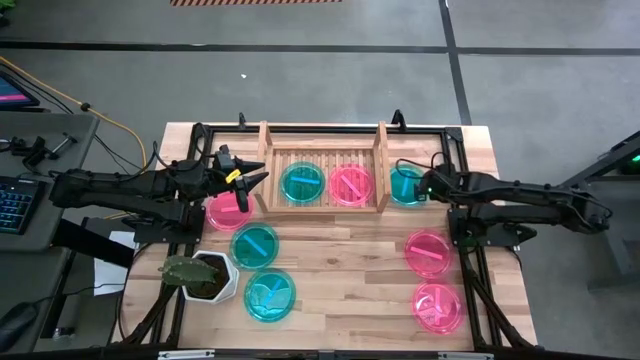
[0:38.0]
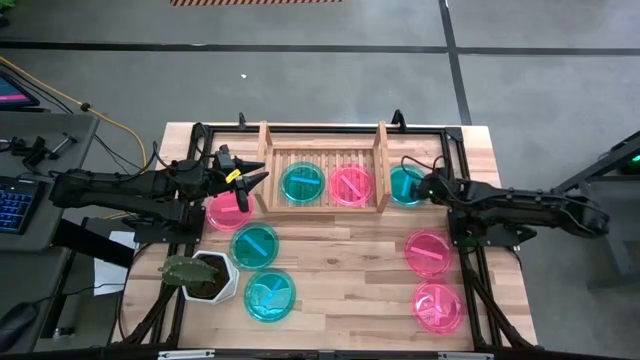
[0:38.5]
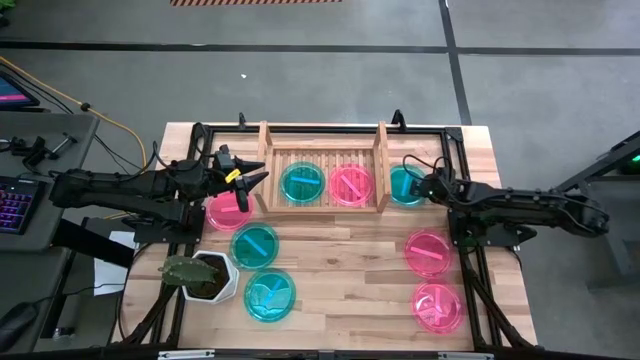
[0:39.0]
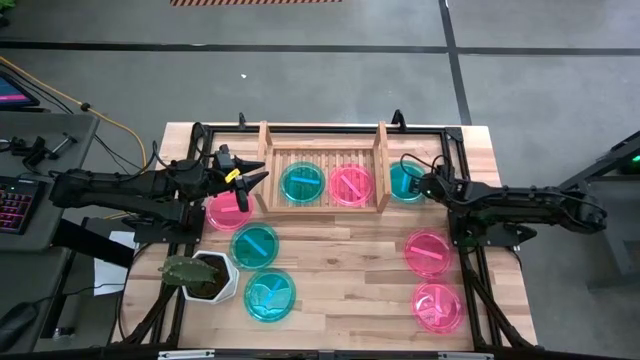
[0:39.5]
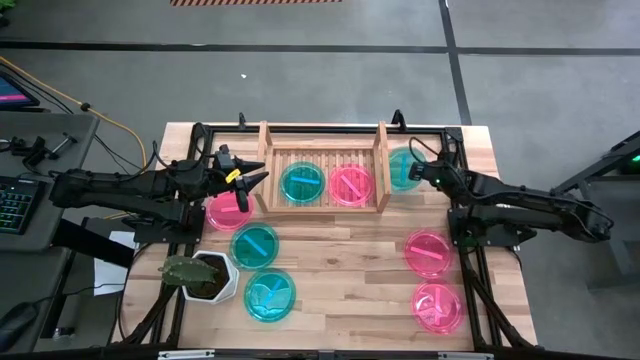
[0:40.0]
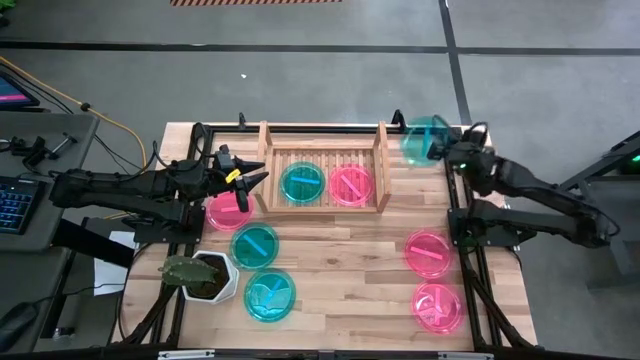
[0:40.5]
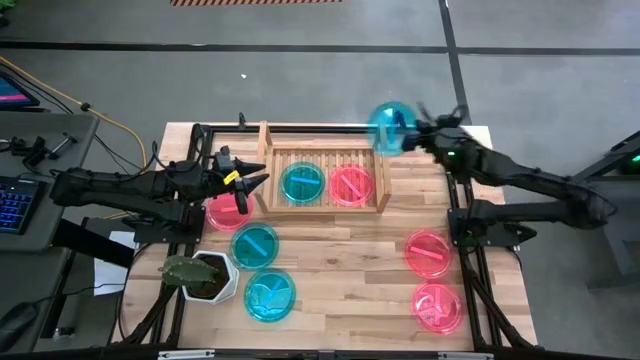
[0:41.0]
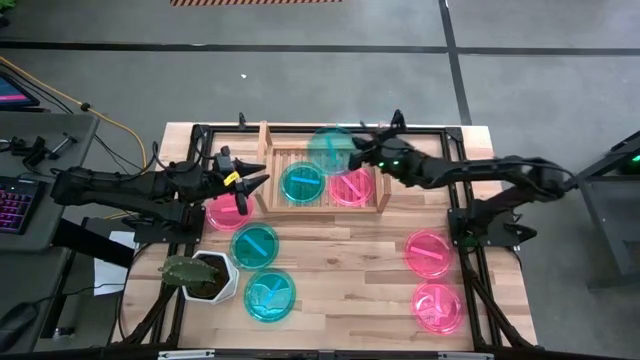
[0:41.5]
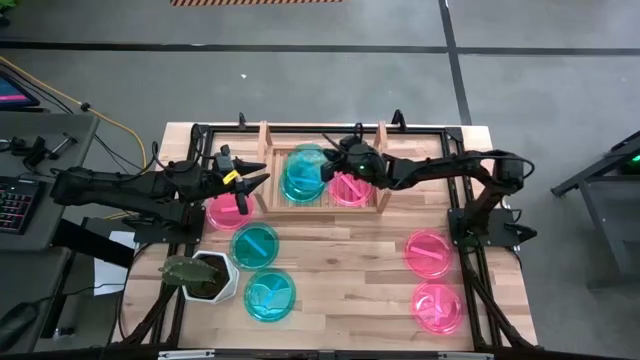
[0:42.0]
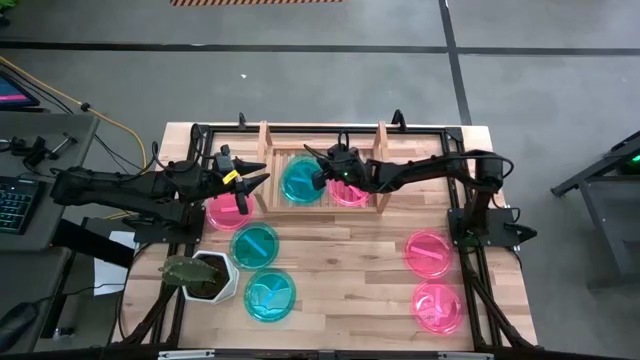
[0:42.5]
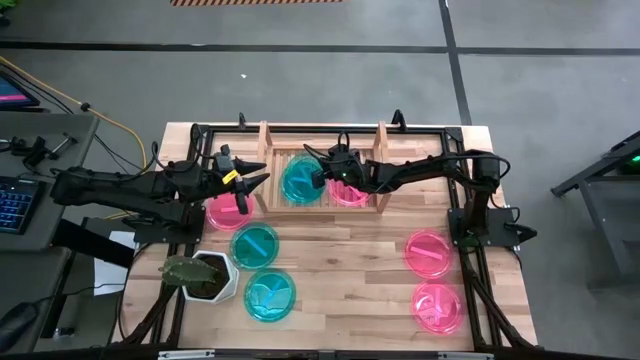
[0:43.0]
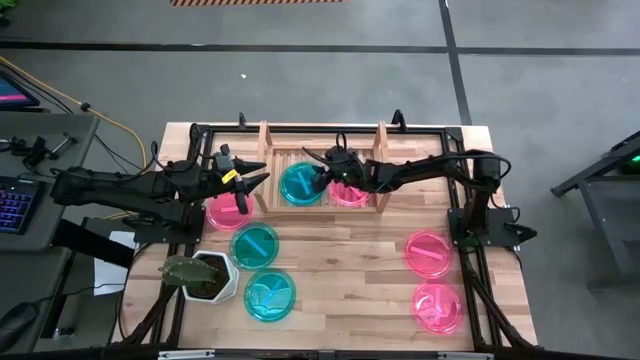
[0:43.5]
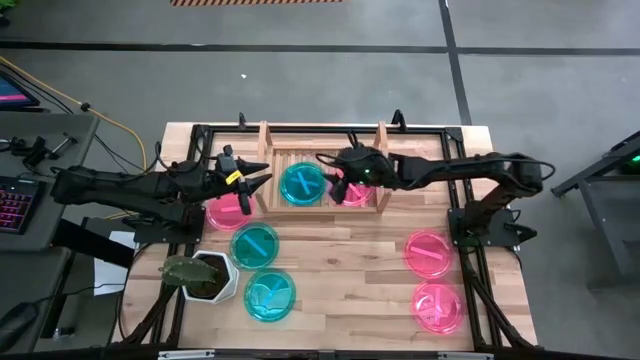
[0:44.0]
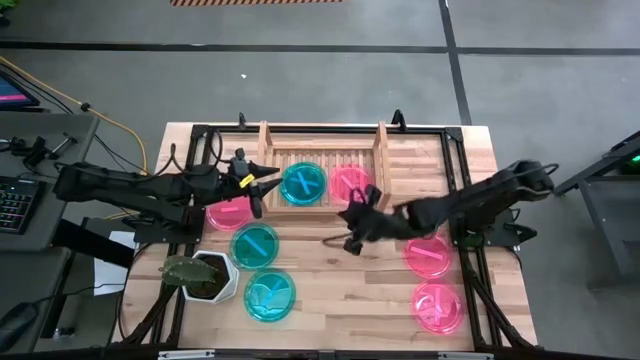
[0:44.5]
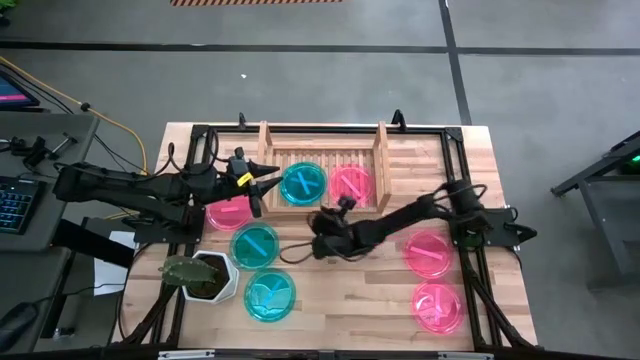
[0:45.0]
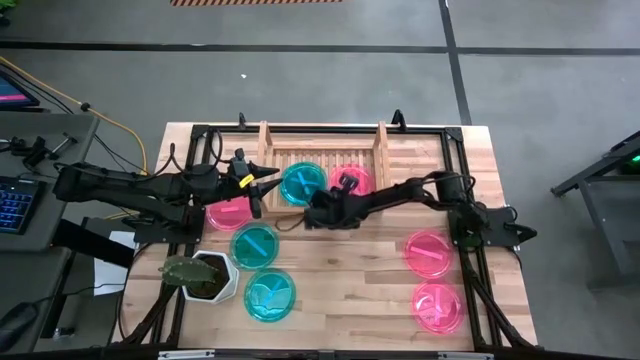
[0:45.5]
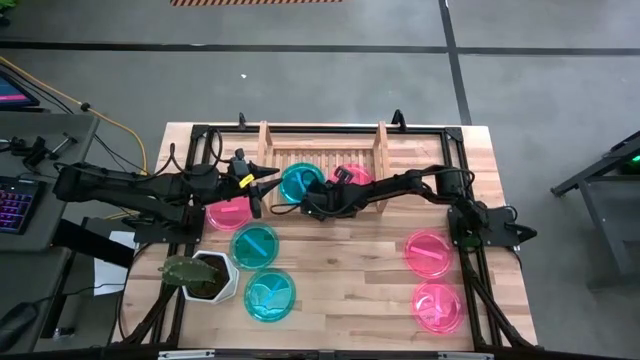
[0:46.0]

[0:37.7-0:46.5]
Task: Place and stack plates onto a shelf
Stack the blue plate on top of the blue plate on the shelf

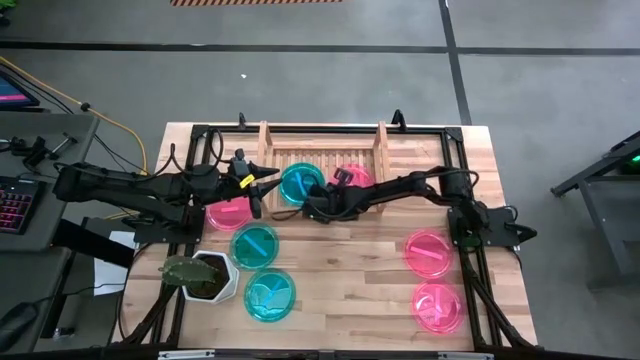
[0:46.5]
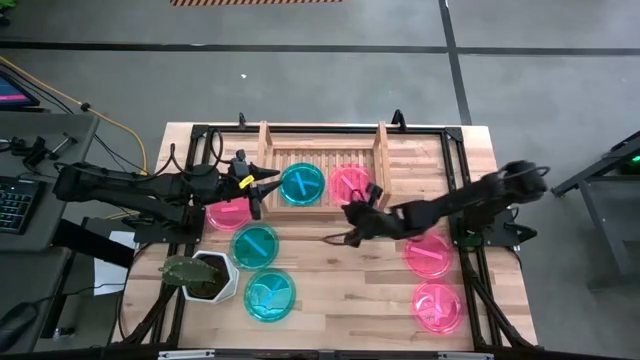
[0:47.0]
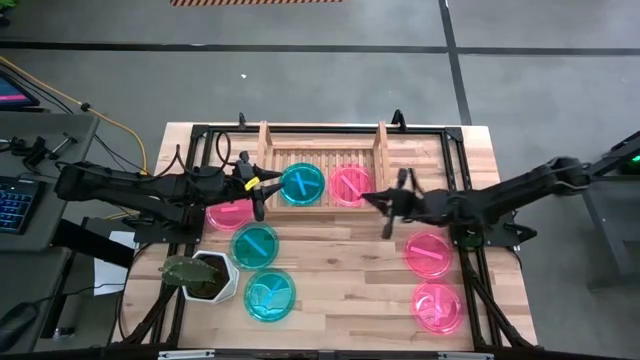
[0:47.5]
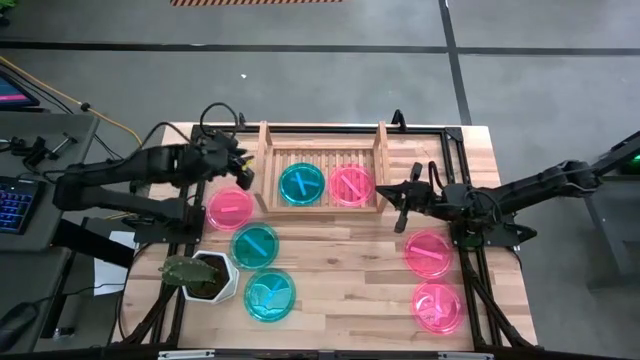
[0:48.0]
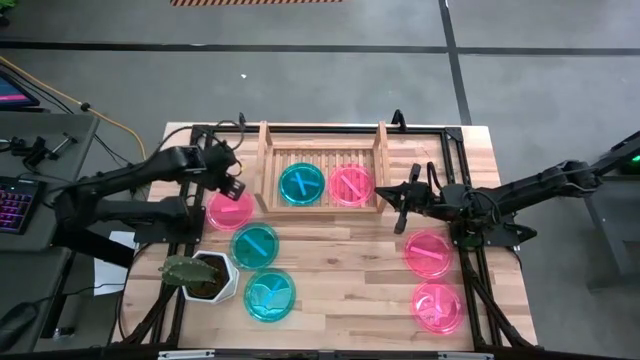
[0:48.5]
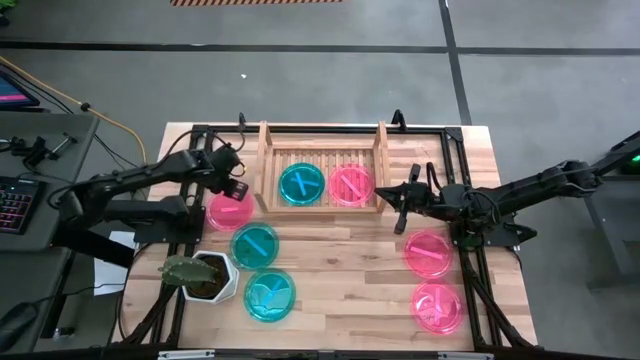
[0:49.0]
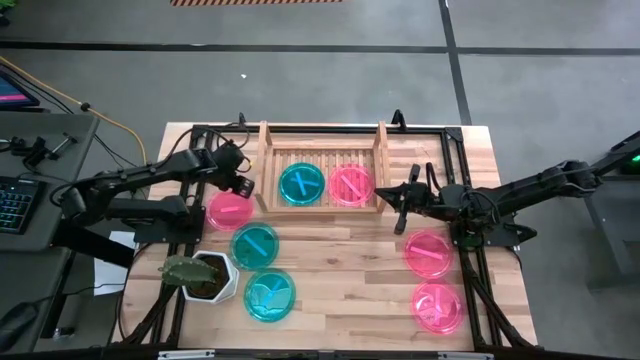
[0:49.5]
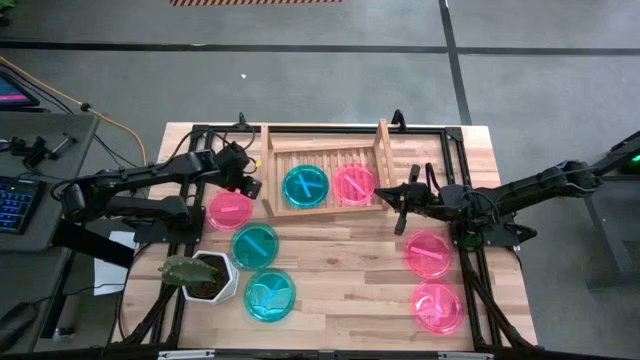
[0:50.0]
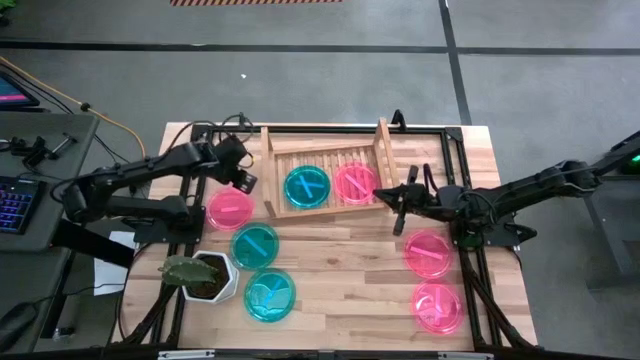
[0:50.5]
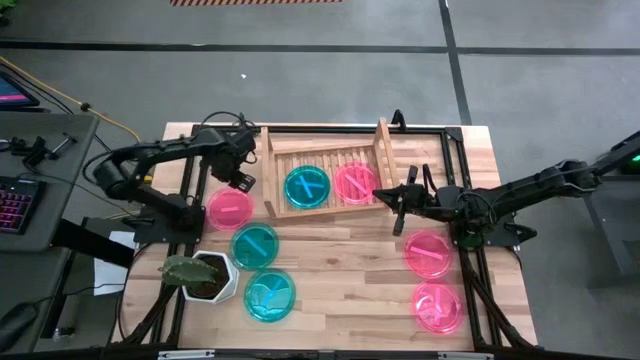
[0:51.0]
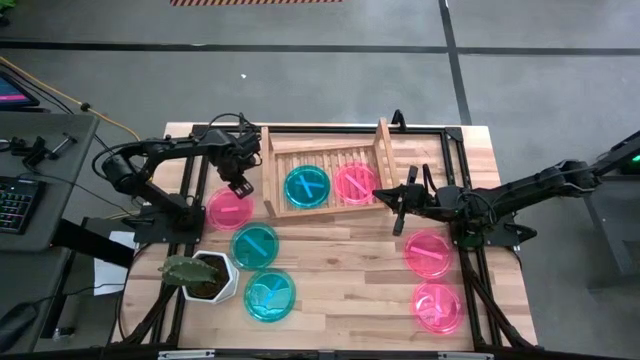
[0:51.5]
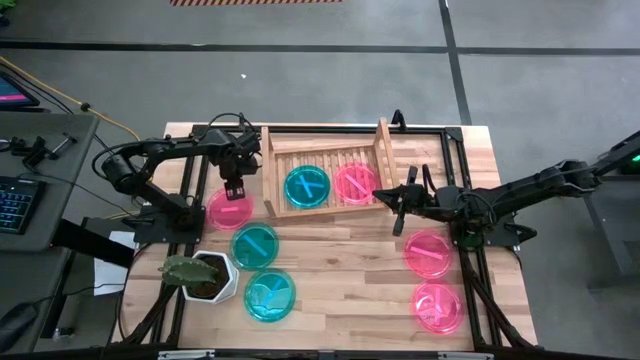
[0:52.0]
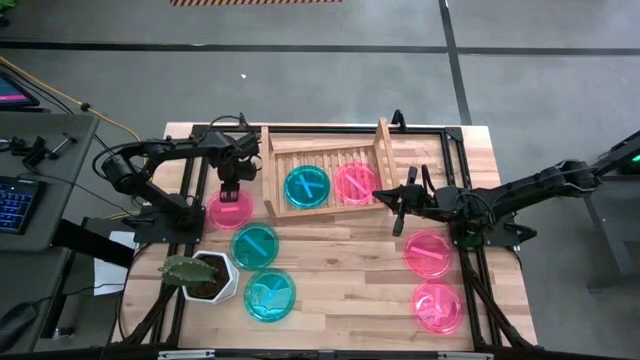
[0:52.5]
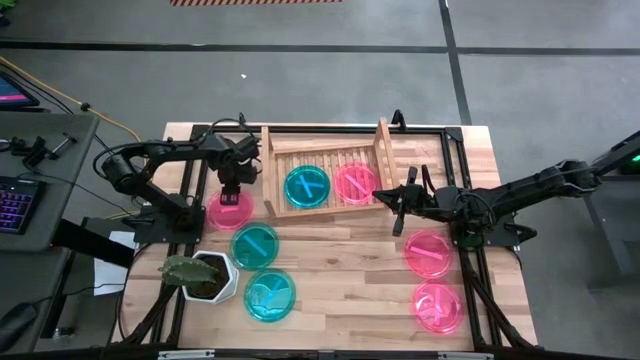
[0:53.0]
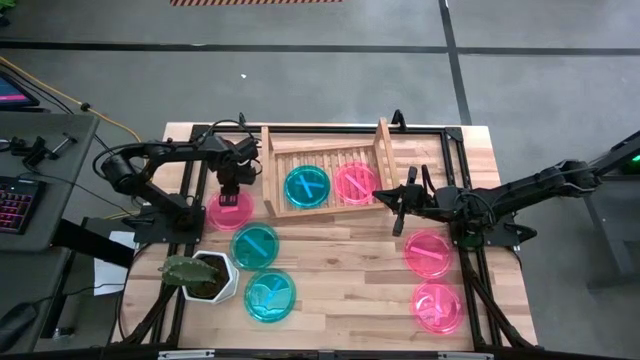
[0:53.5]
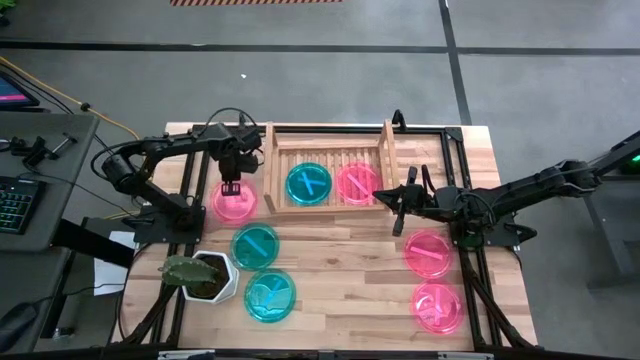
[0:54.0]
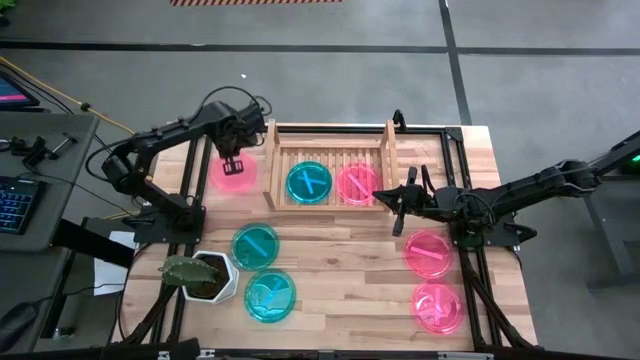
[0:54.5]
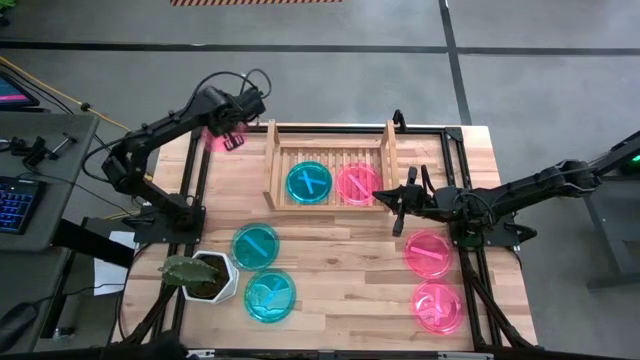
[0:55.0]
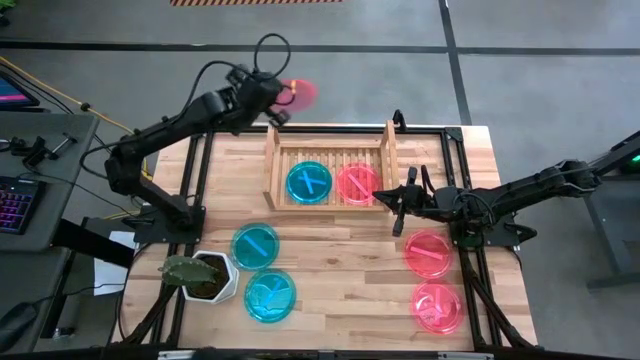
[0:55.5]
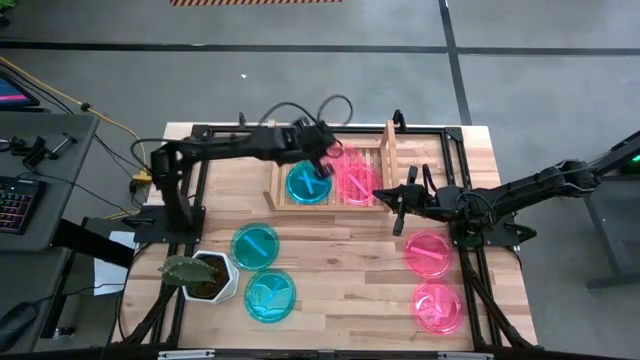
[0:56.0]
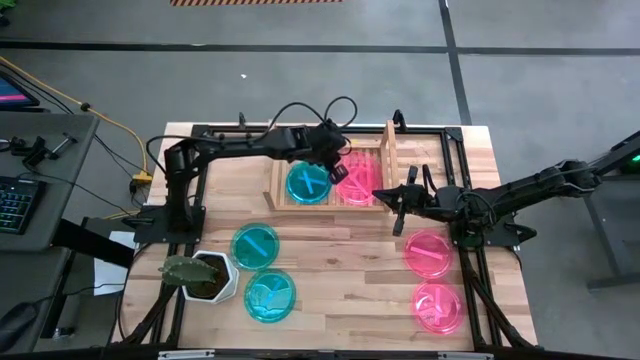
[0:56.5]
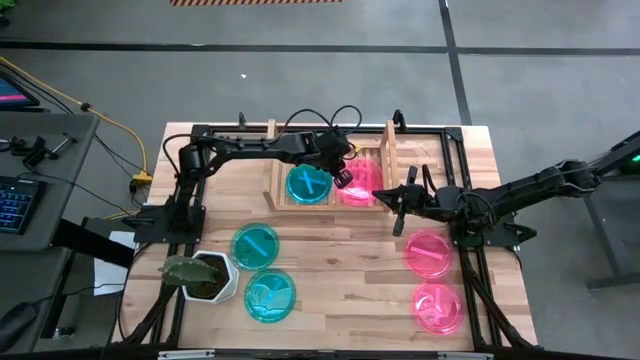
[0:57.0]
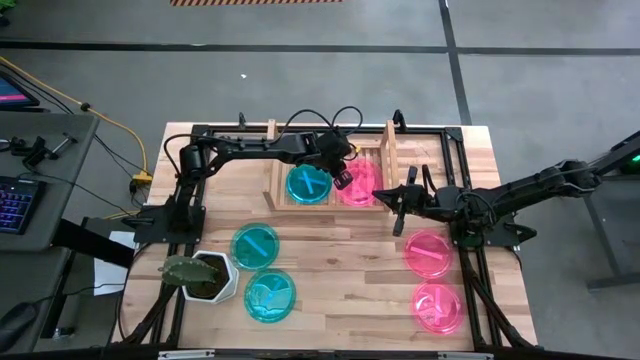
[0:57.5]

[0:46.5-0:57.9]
Stack the pink plate on top of the pink plate on the shelf

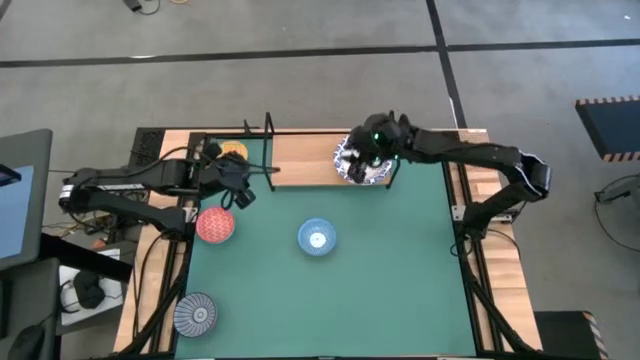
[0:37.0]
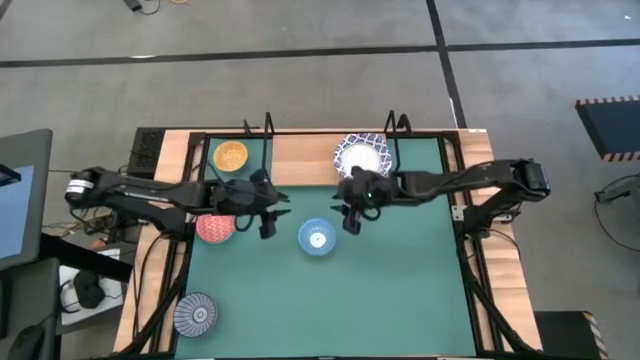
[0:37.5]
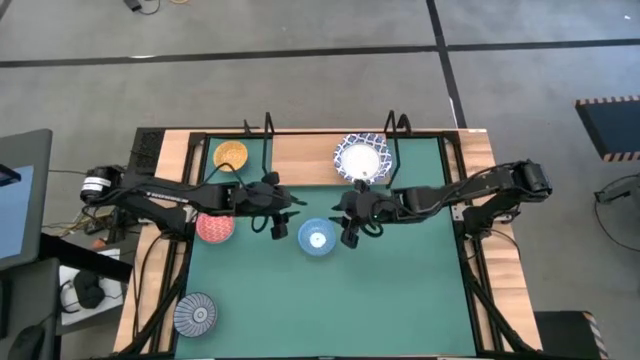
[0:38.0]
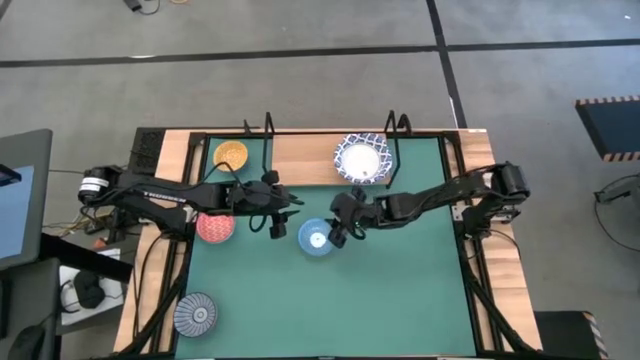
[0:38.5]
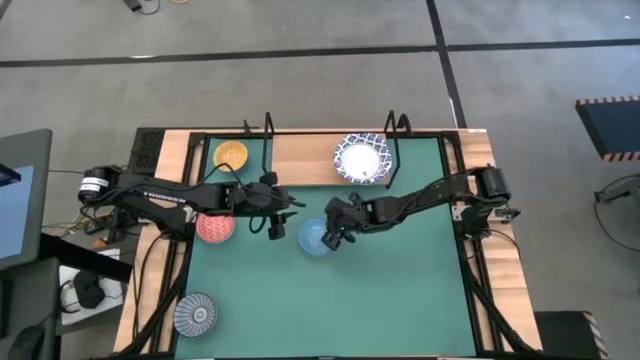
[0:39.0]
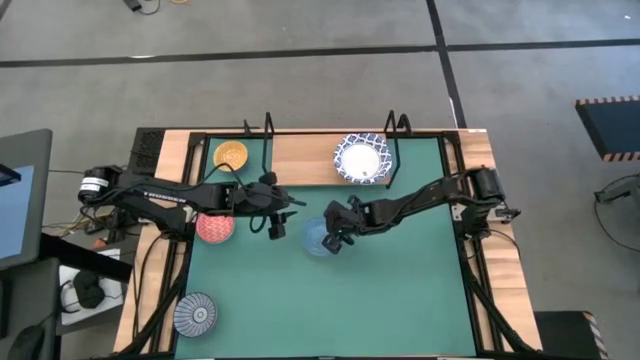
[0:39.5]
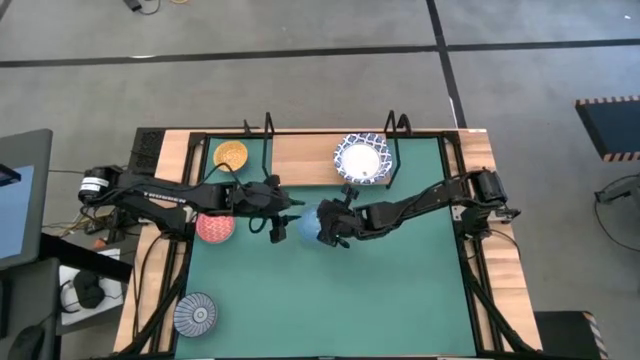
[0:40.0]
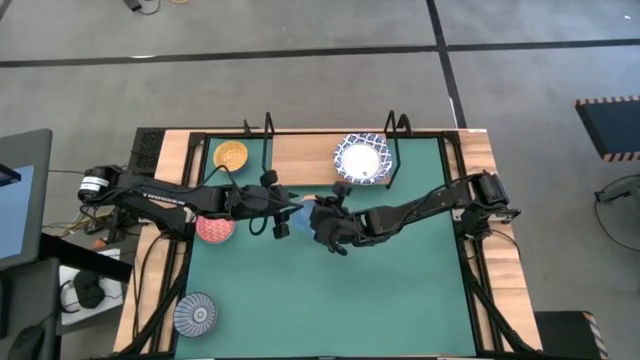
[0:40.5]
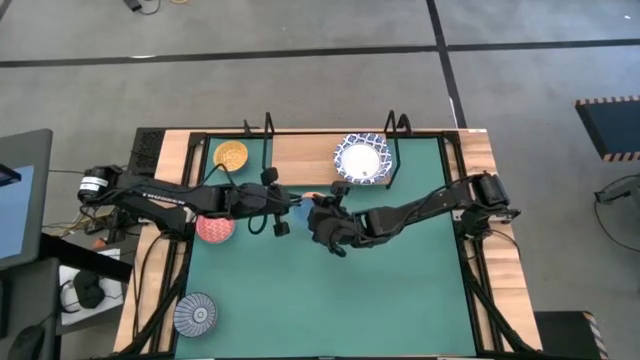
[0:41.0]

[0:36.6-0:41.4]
Task: Place and stack bowls onto a shelf
Put the blue patterned bowl on the shelf
